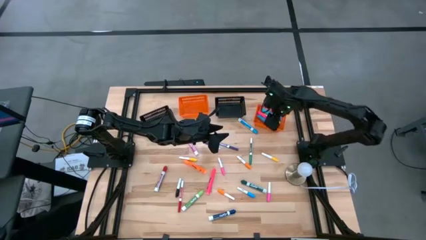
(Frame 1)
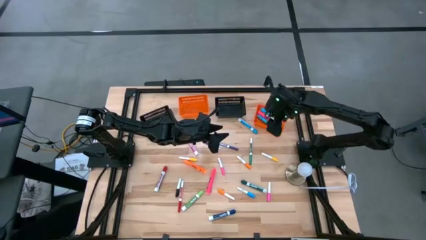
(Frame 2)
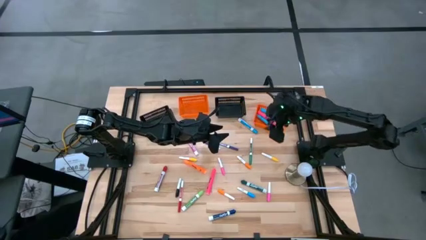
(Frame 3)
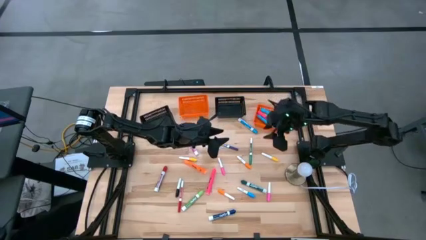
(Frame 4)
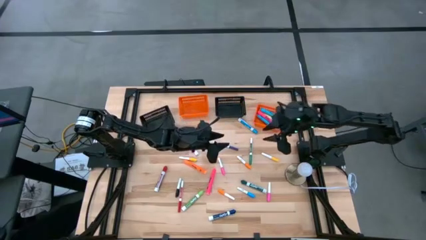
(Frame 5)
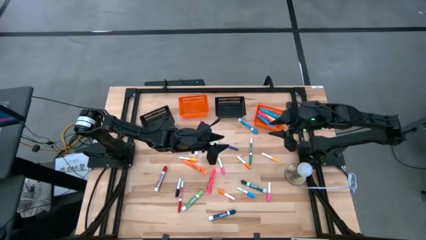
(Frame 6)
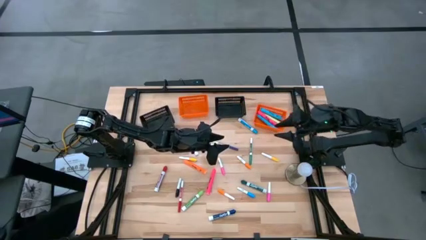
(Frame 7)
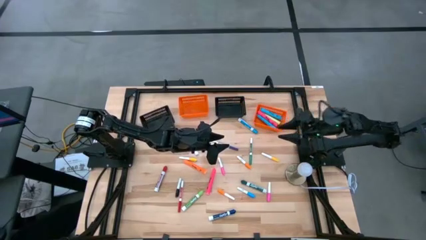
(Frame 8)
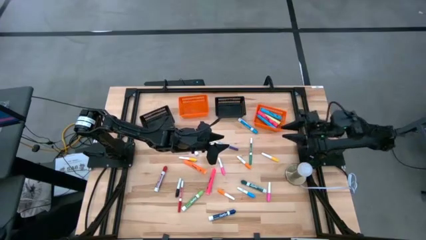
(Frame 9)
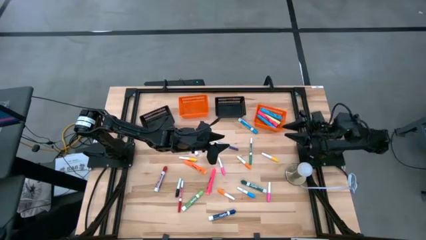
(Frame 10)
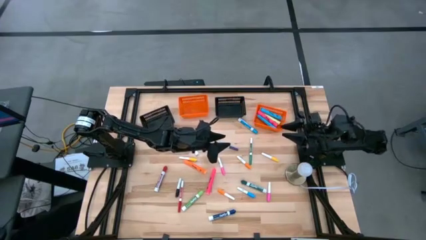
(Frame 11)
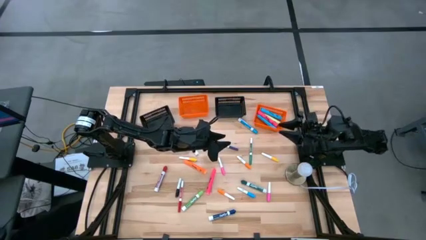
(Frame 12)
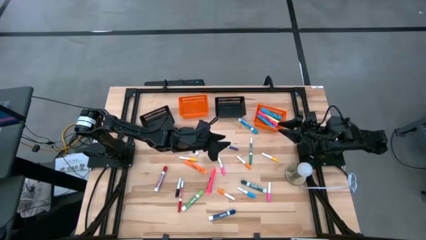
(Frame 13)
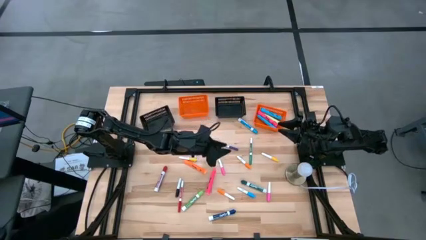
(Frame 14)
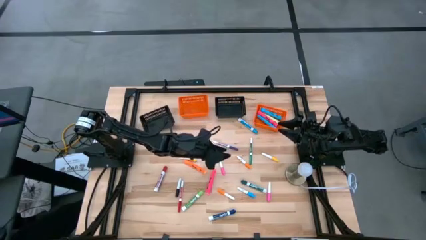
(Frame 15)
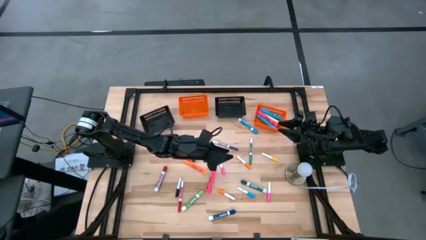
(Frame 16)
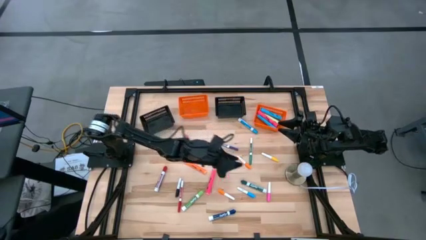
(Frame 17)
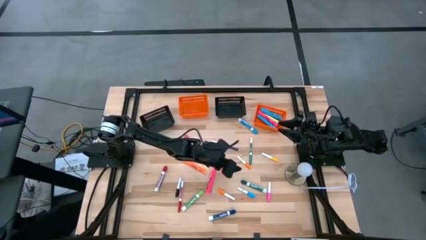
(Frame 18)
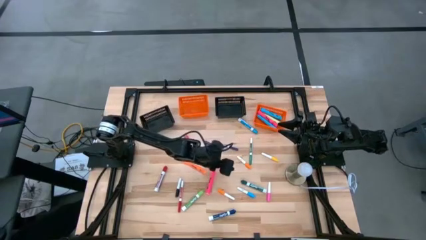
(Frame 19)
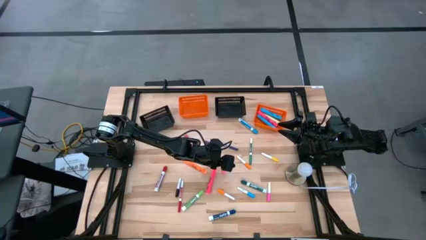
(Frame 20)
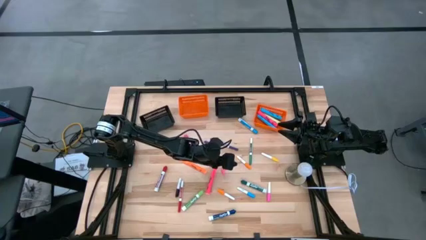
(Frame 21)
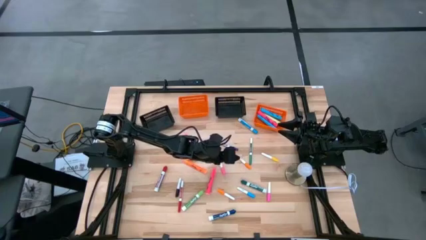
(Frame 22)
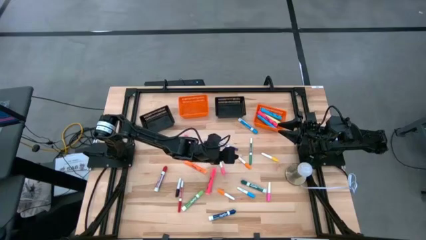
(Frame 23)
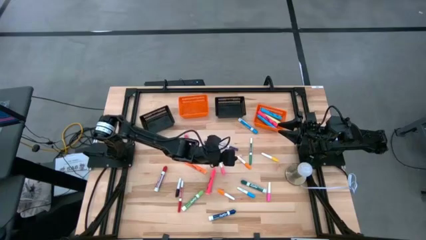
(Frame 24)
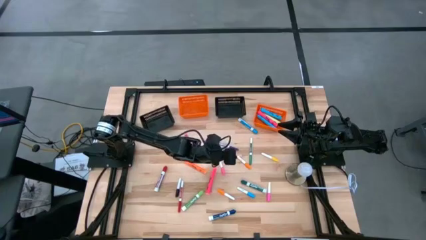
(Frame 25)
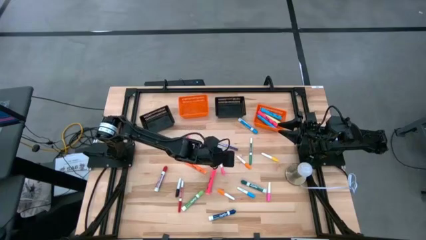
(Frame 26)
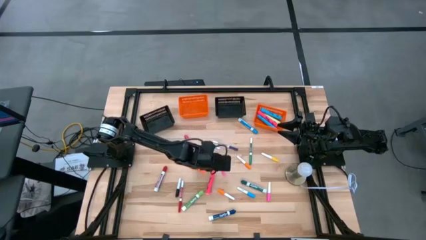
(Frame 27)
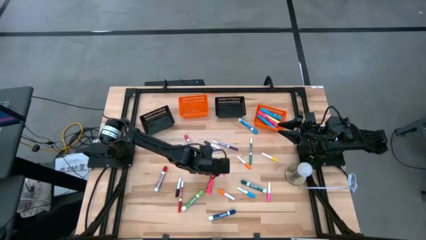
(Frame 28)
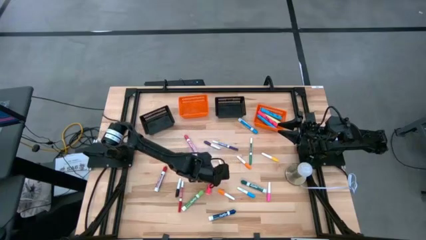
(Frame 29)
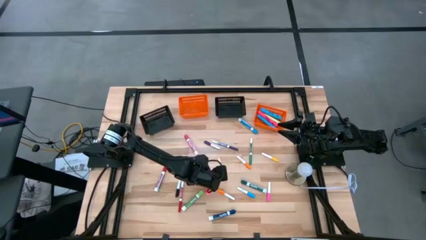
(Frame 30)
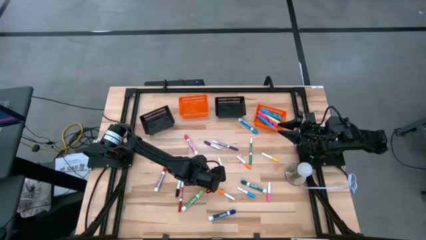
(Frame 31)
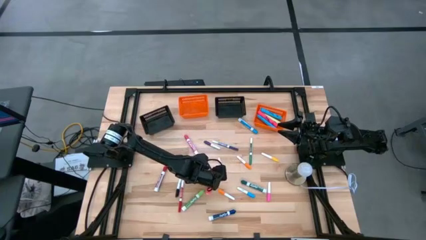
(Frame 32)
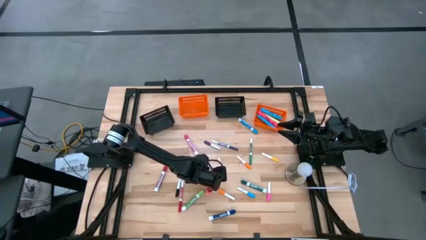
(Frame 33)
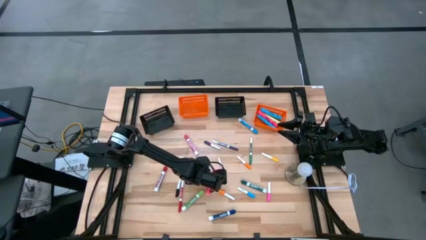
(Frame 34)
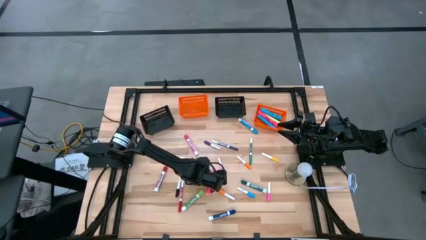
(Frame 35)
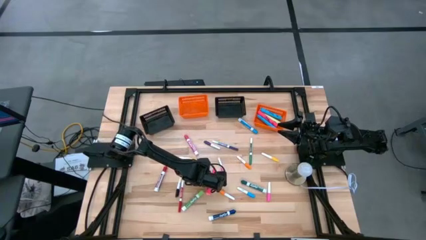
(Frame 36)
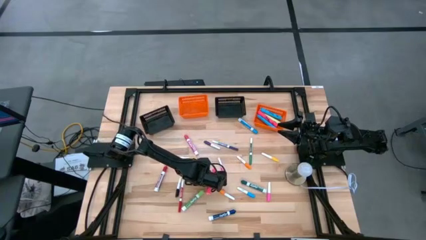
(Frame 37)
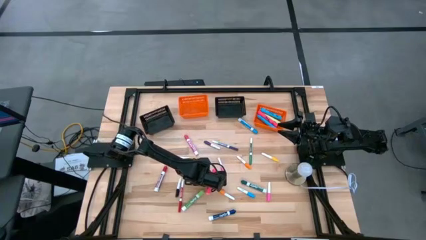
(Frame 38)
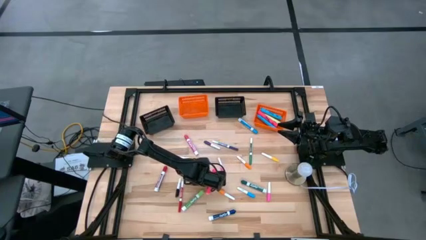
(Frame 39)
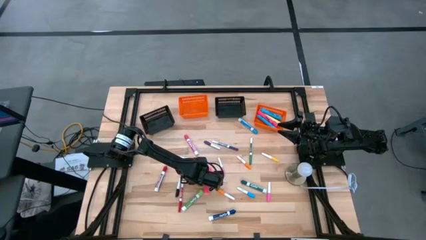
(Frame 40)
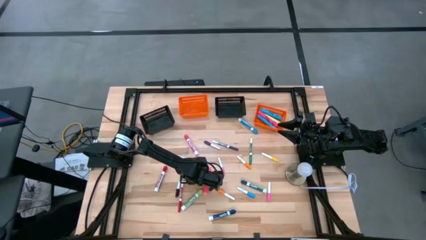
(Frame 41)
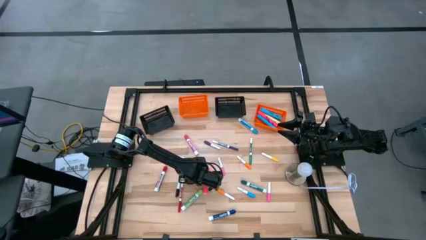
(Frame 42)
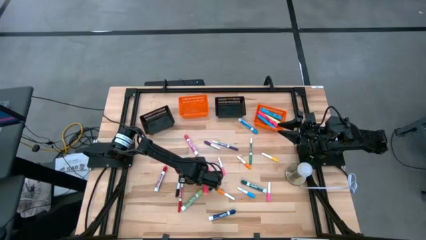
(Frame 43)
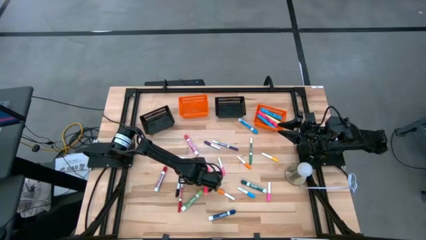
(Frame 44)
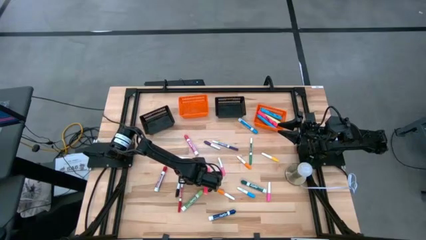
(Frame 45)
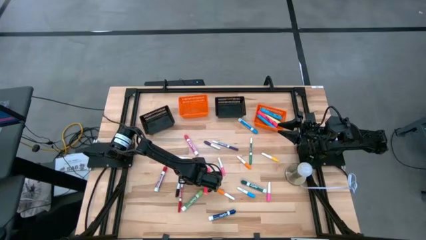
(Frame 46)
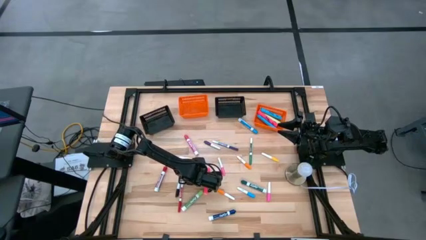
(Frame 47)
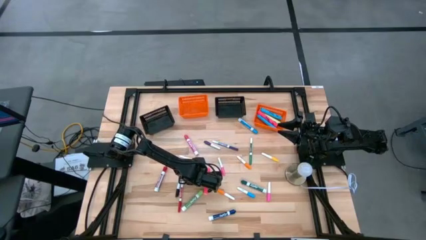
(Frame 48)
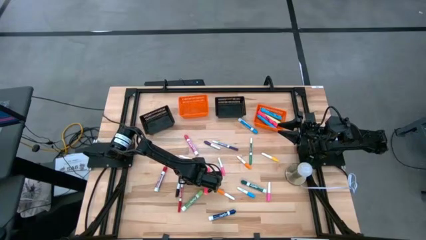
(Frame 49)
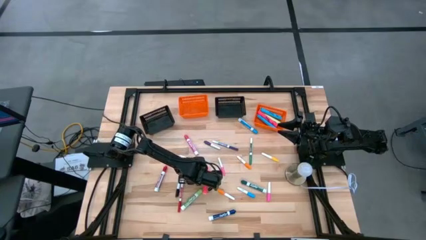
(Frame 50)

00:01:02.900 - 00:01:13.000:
Task: Pick & Place Markers
Put the pink marker into the right orange bin

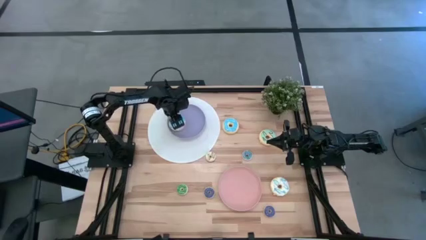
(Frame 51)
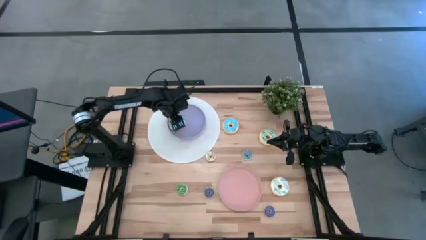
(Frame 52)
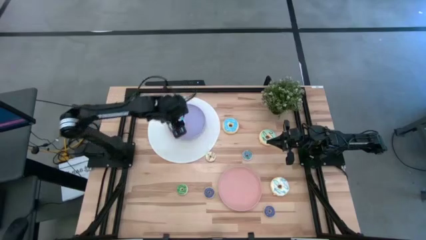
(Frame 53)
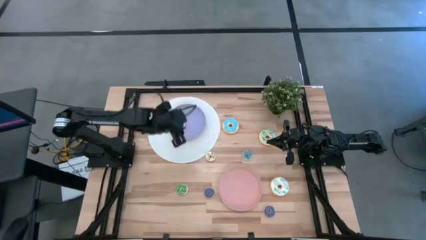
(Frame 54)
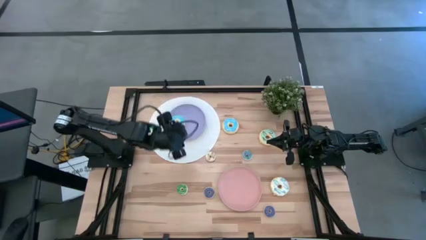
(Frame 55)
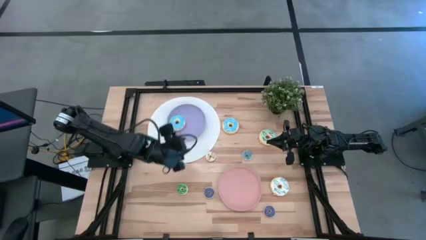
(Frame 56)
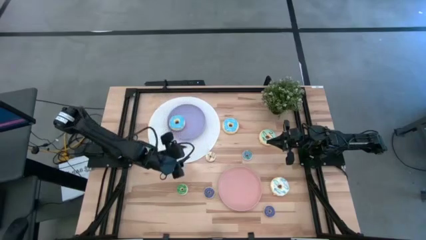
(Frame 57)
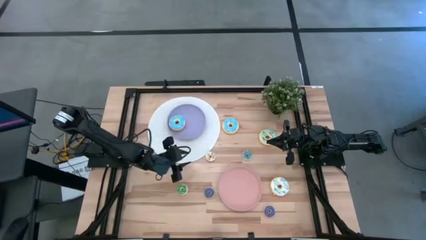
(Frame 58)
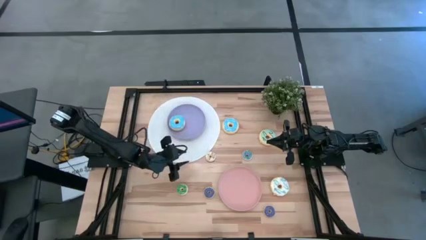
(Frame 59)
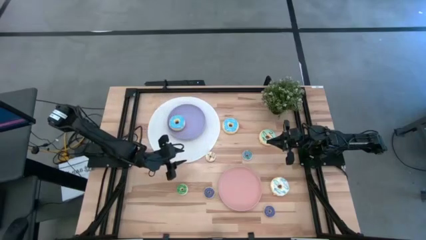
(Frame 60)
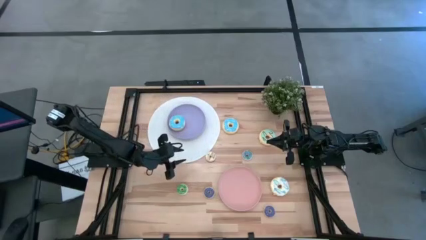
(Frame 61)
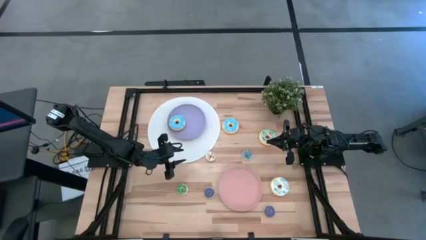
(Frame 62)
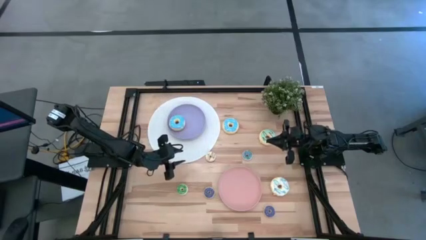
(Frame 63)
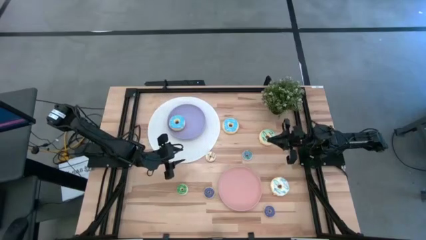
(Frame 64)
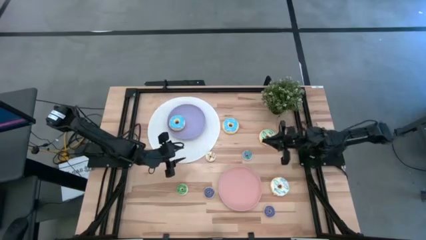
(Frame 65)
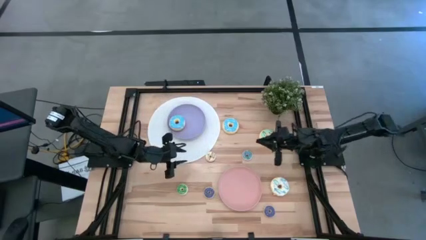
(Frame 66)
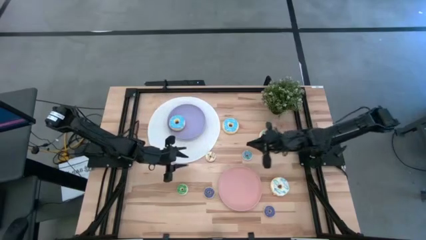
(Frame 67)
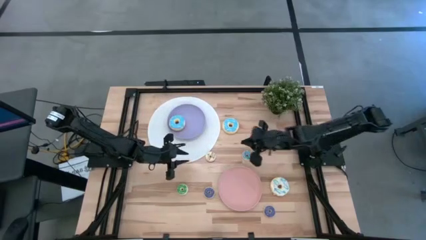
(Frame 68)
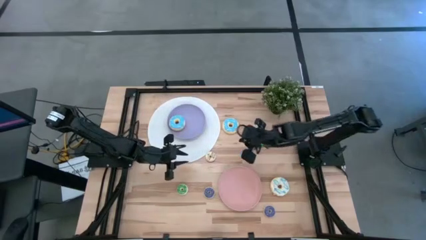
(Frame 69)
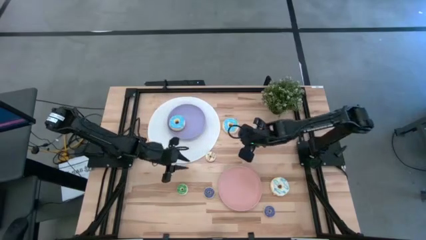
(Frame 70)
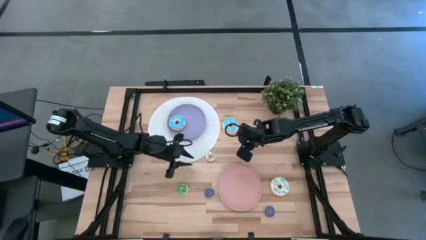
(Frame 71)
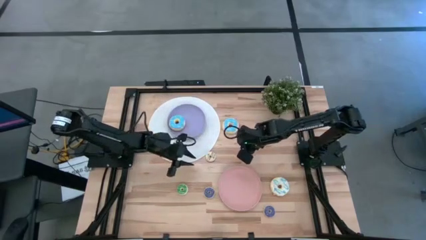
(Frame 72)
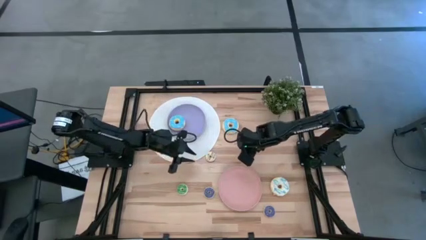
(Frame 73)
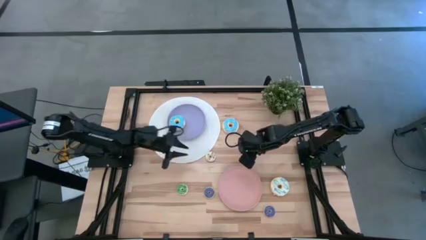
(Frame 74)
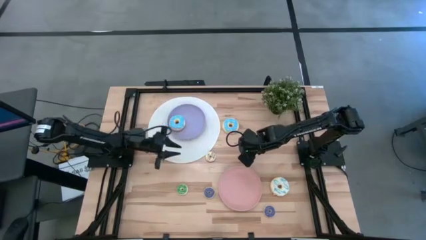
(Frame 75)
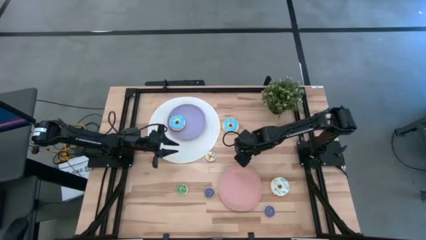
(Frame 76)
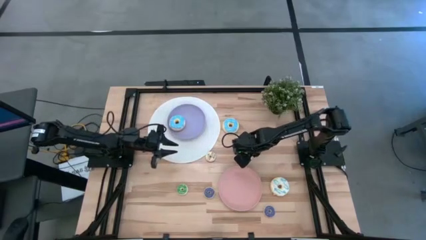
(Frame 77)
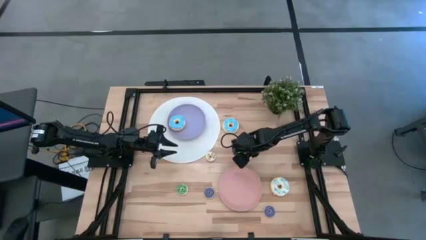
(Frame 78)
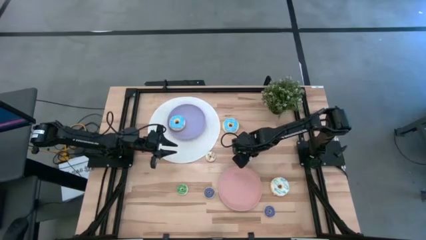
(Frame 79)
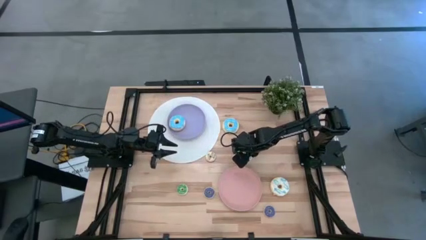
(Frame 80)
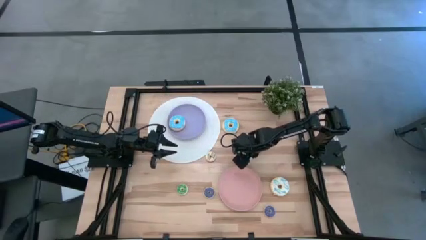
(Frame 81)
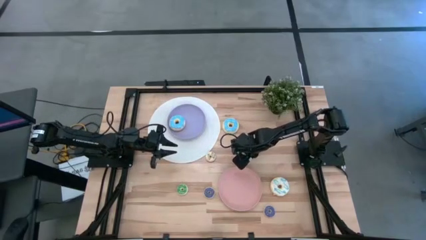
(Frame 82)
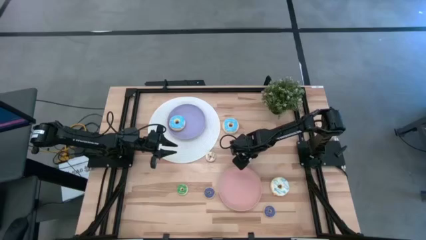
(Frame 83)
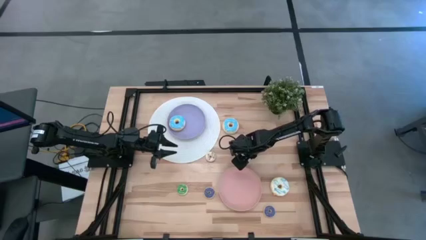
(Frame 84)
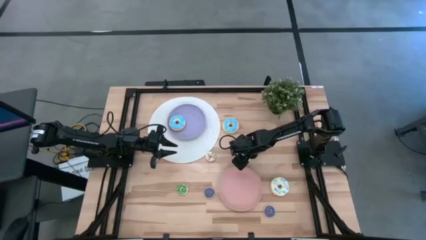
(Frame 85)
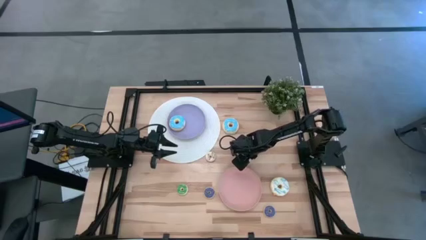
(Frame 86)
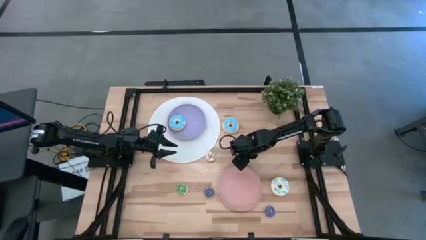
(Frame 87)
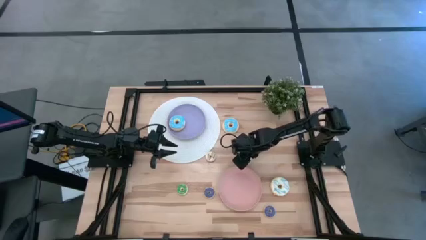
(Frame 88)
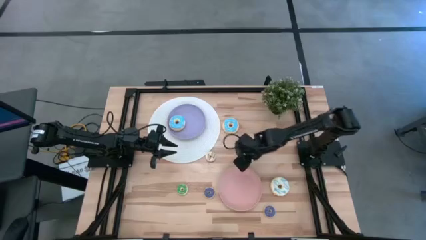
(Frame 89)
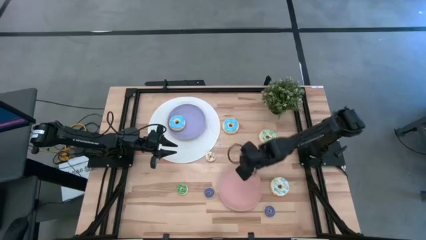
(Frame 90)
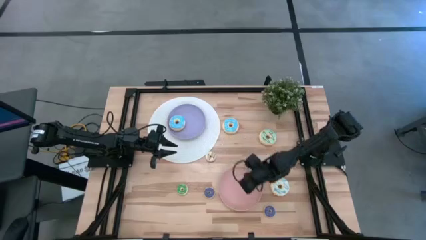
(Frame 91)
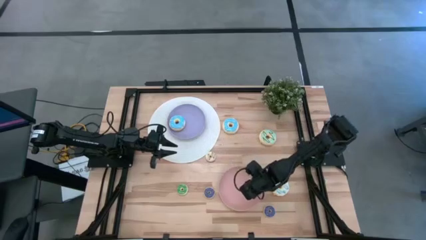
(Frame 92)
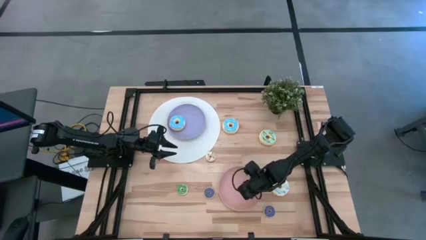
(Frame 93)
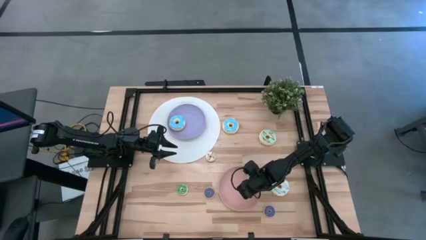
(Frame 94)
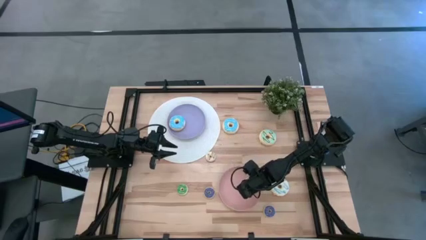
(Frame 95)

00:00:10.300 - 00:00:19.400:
Task: Pick & Place donuts
Put the small light blue donut on the pink plate
